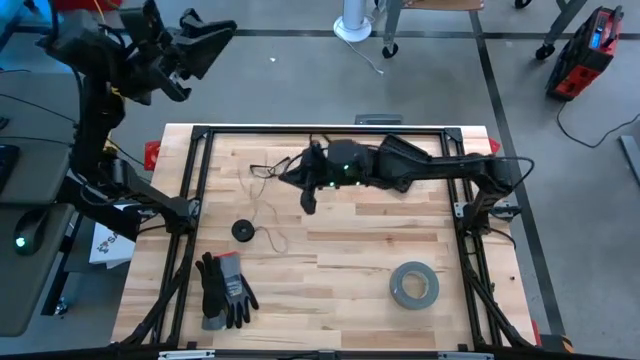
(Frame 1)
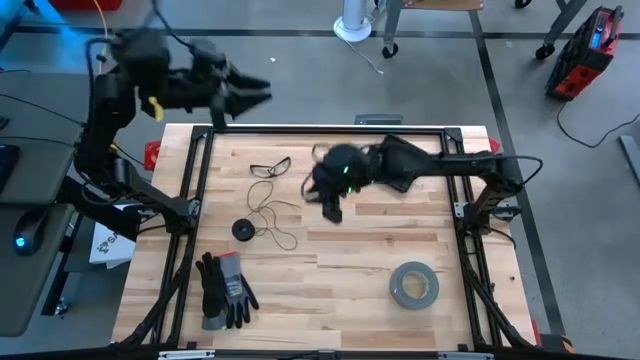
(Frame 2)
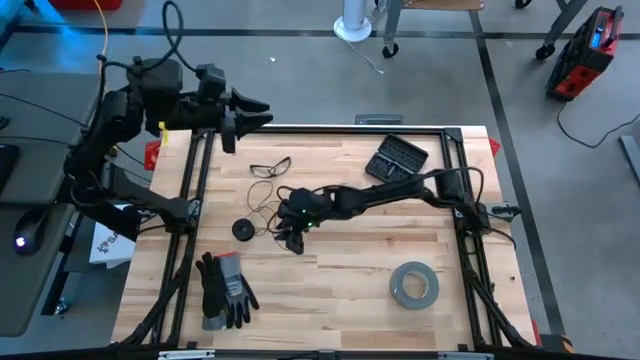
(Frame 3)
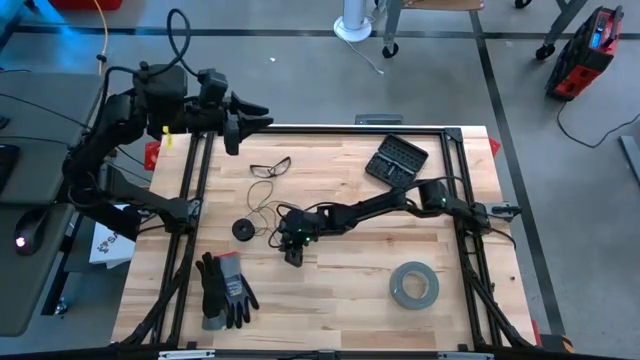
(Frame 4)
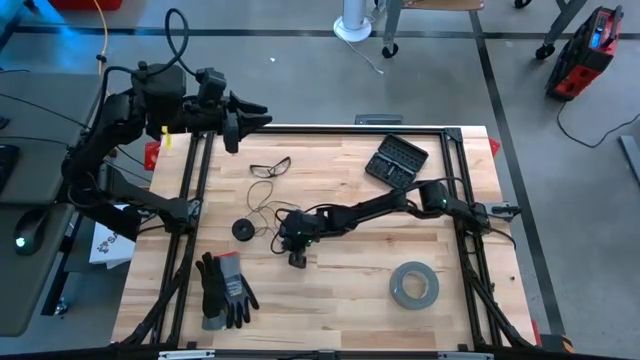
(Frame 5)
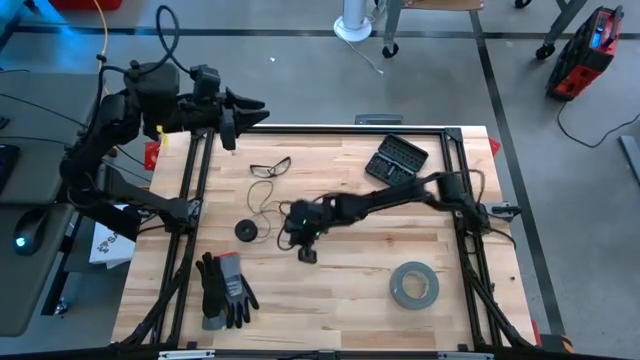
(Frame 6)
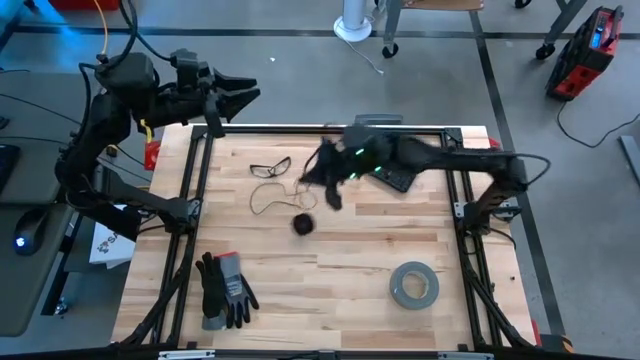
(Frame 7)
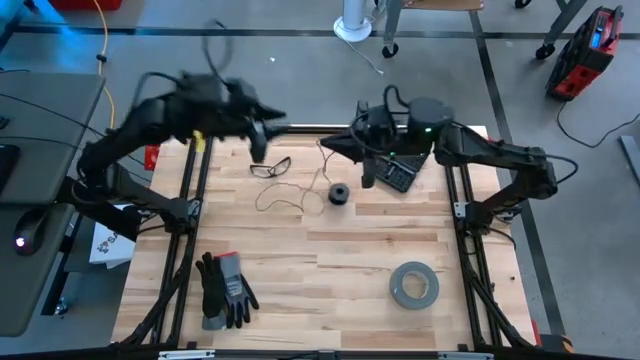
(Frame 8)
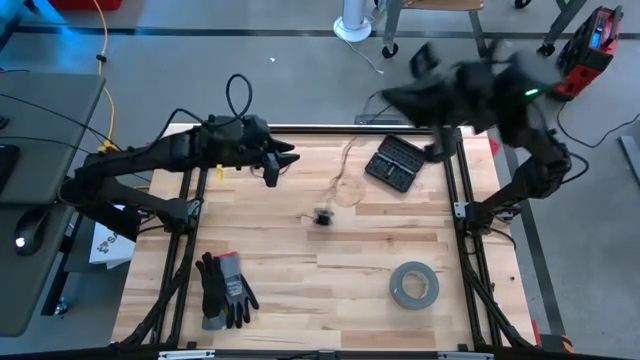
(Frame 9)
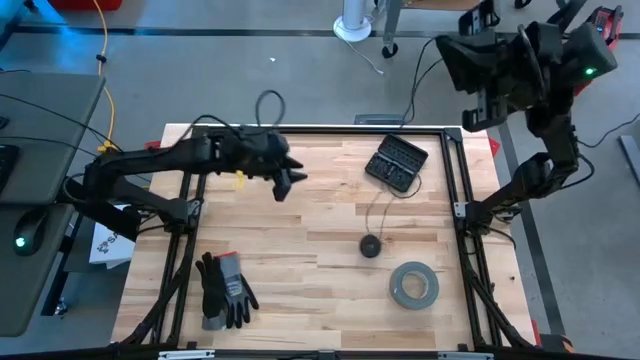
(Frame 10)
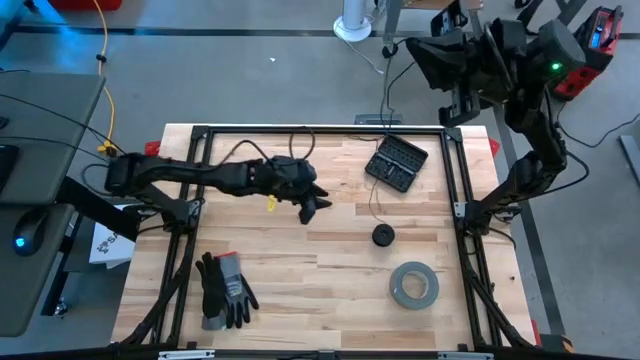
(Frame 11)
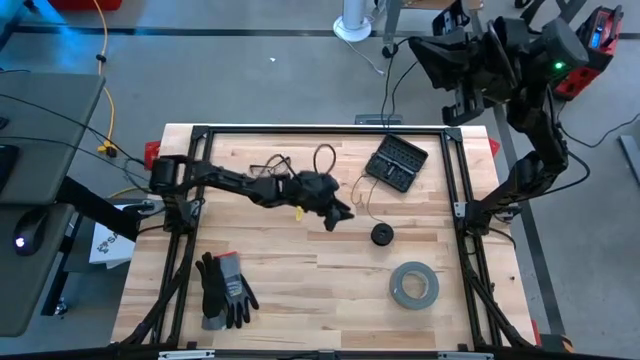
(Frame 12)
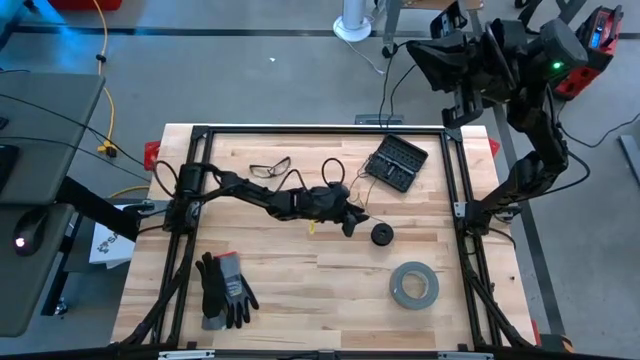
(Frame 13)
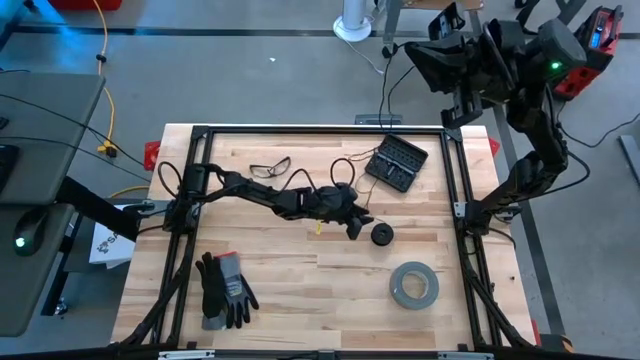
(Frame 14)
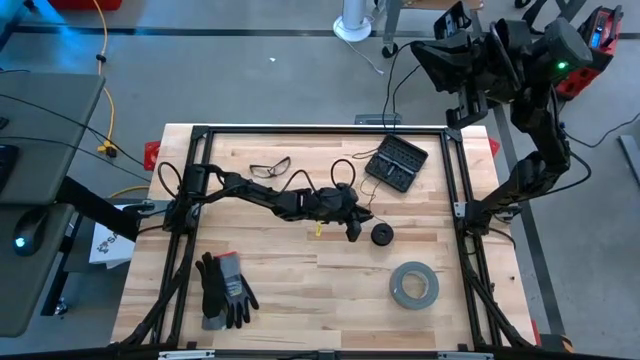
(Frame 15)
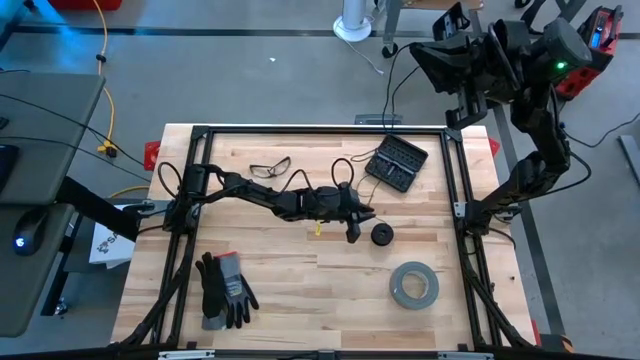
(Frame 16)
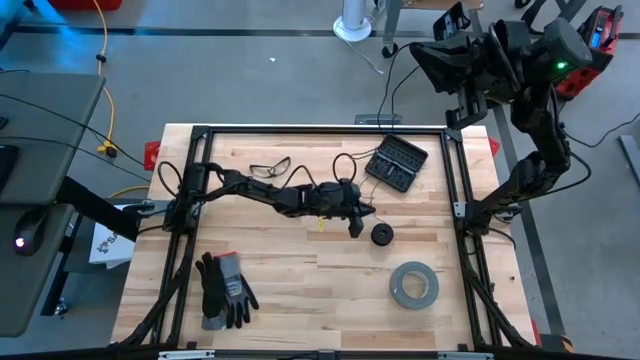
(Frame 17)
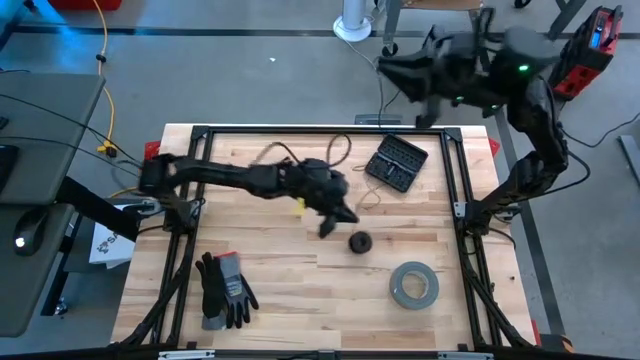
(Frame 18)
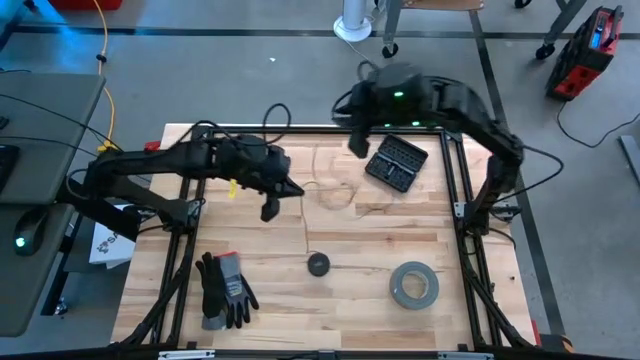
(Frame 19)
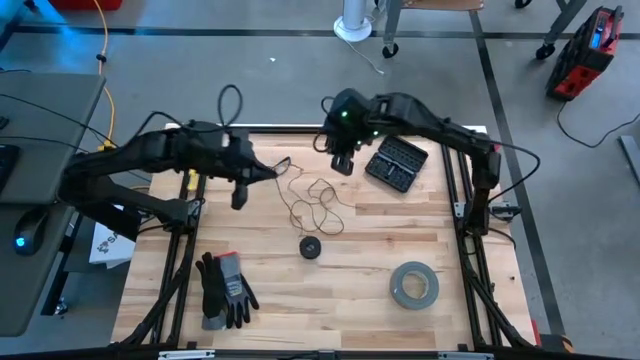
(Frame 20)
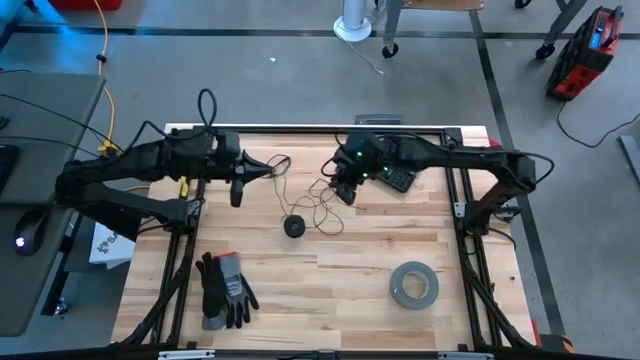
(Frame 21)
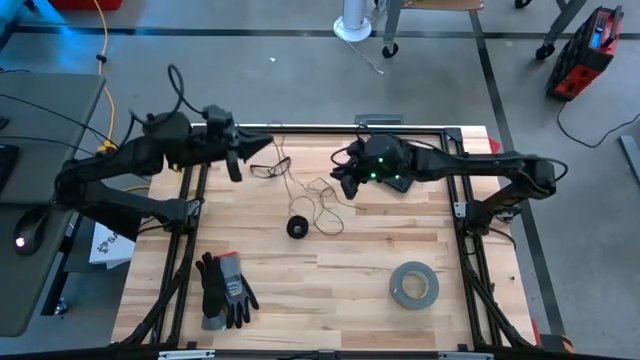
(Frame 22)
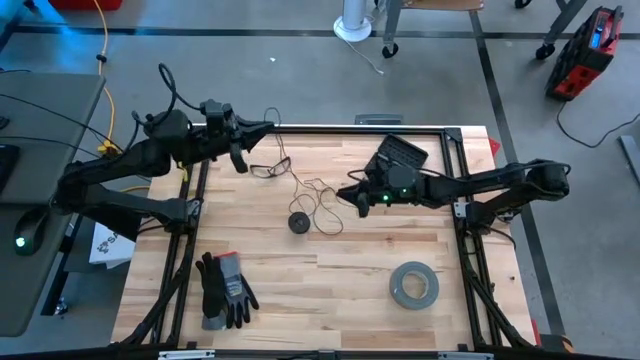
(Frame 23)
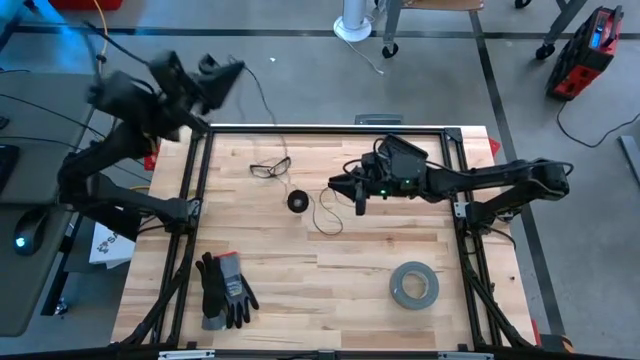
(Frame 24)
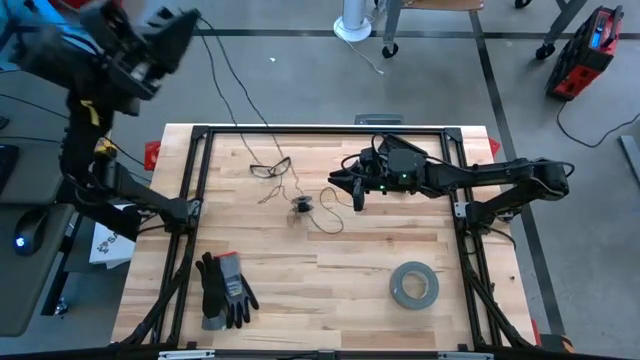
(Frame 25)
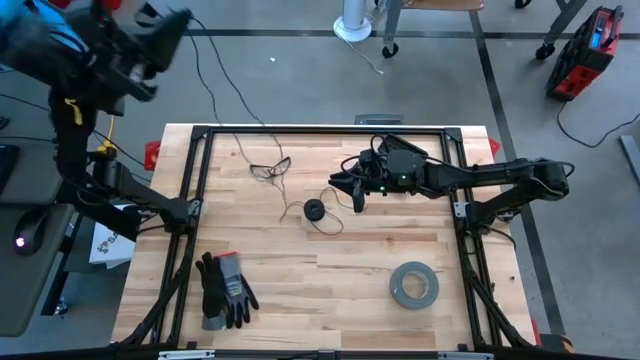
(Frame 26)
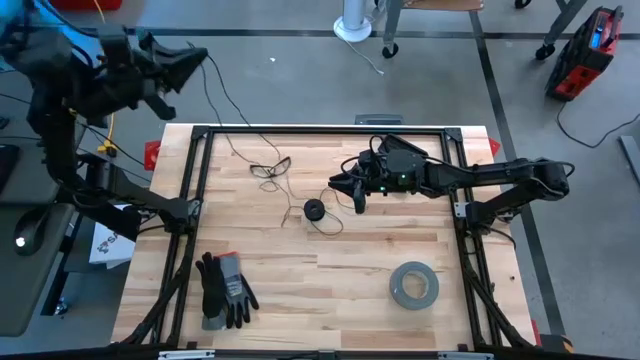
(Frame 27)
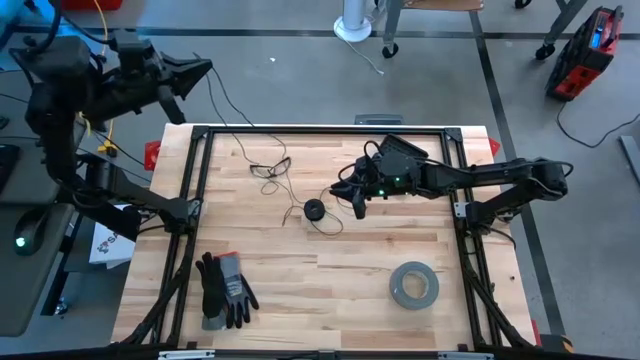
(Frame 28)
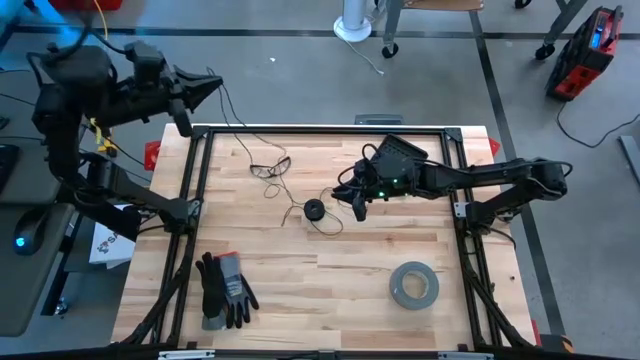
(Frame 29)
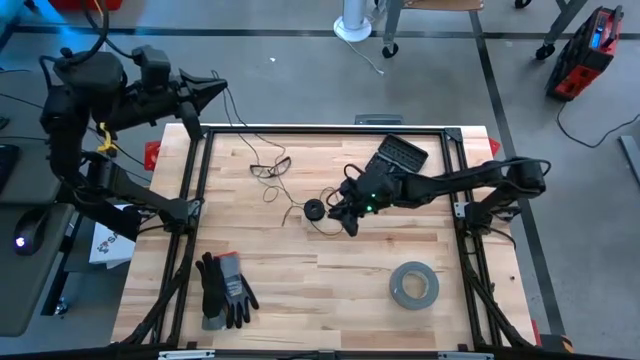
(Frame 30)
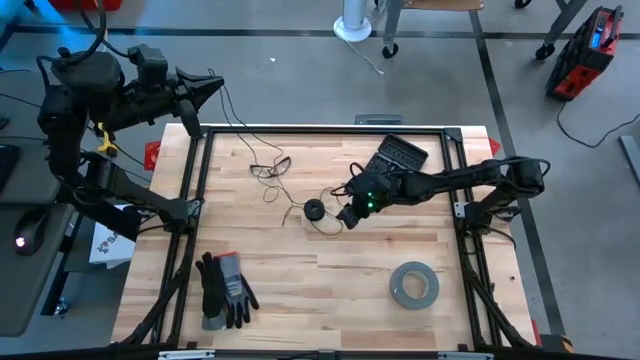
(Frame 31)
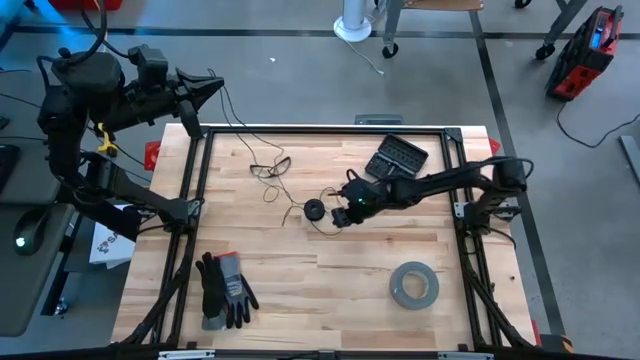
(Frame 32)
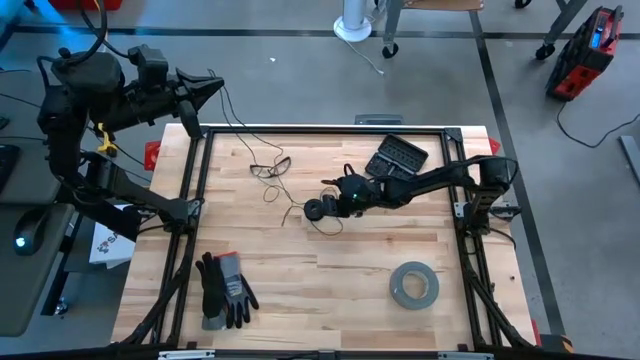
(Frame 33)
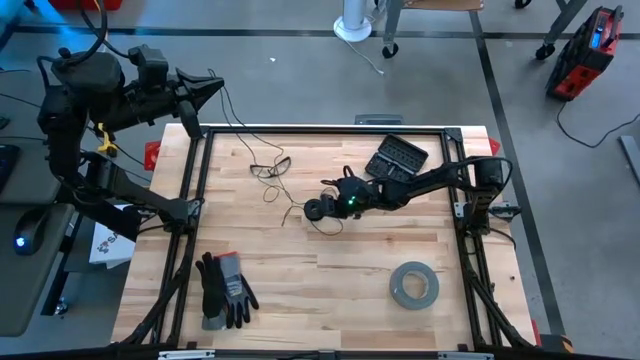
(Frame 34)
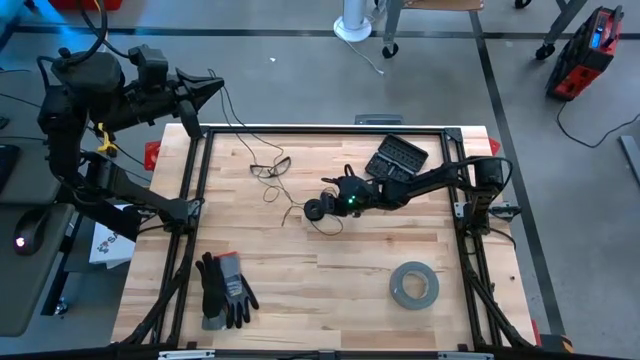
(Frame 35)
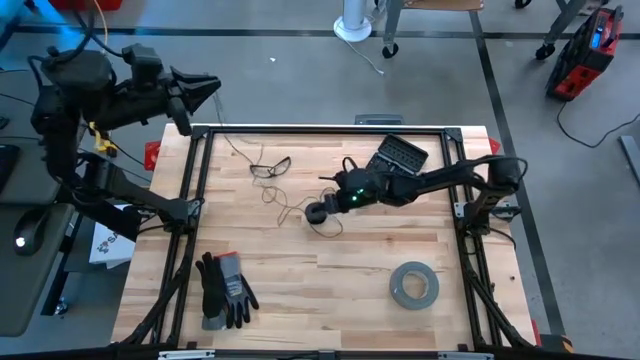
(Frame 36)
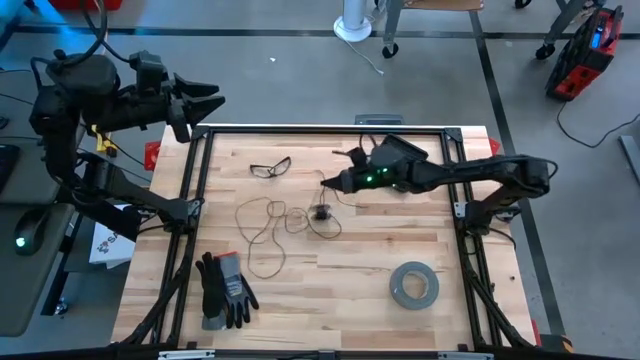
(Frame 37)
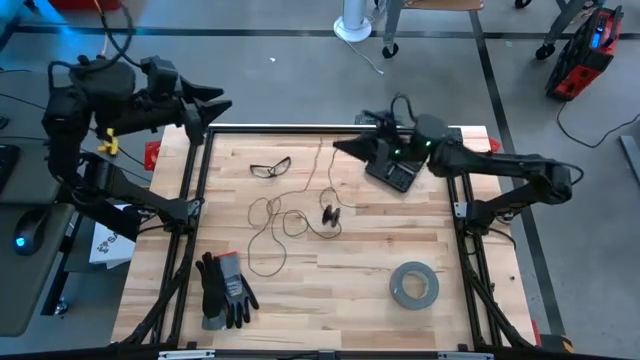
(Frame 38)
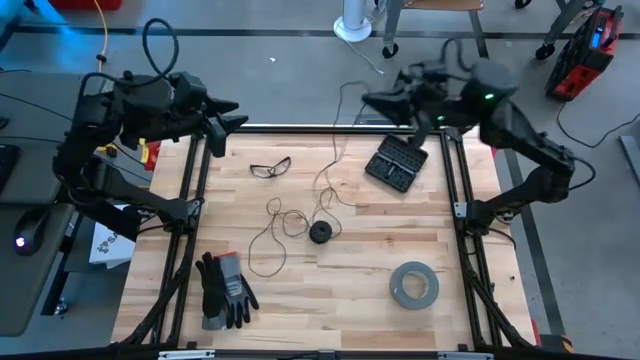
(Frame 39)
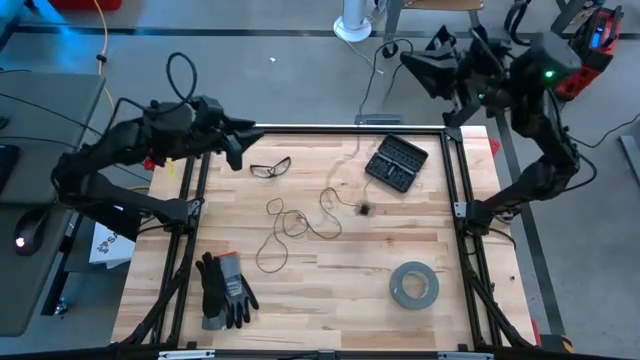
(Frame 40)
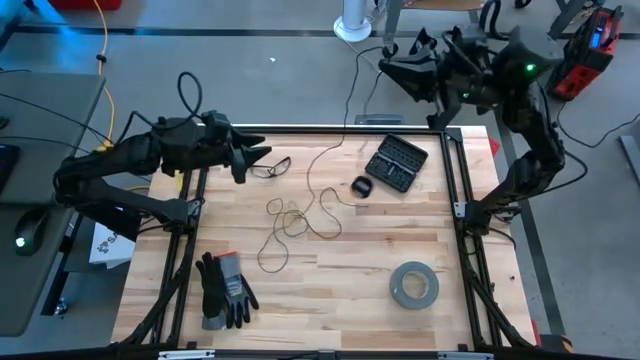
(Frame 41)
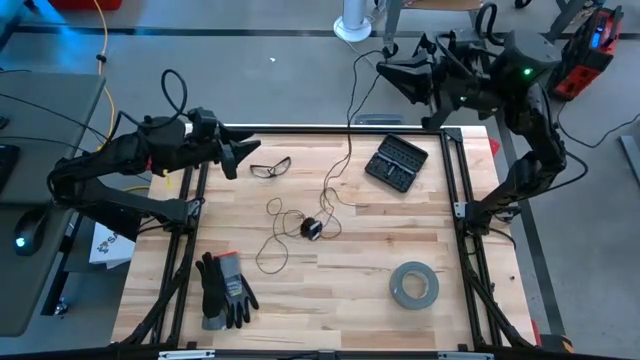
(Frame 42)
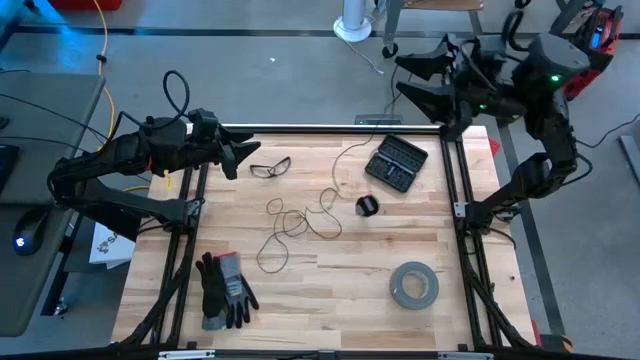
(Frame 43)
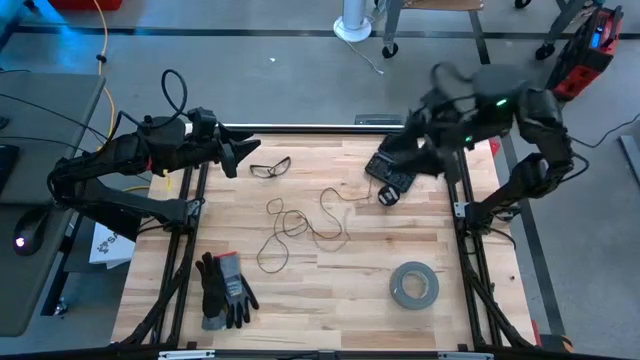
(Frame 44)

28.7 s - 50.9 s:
Task: Coil cords
Uncoil the black wire from the black spool
